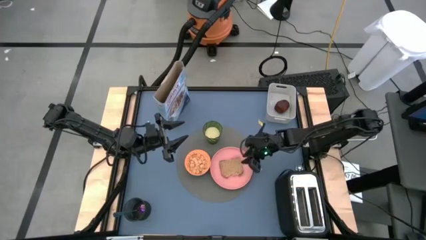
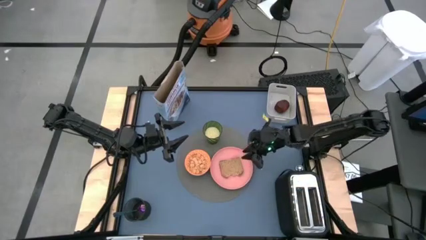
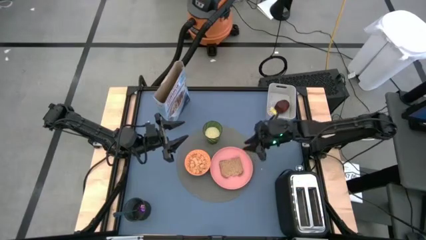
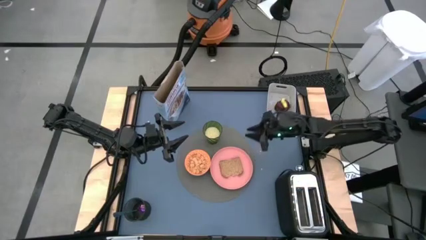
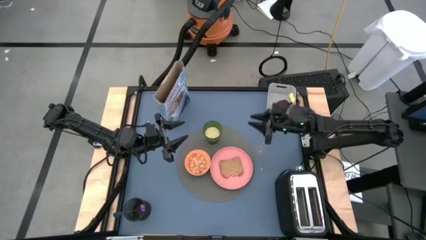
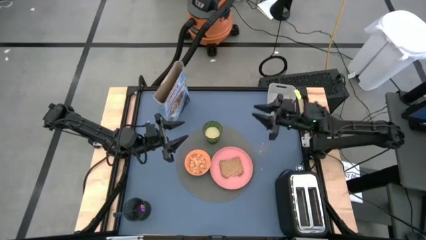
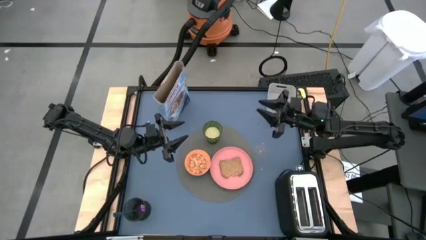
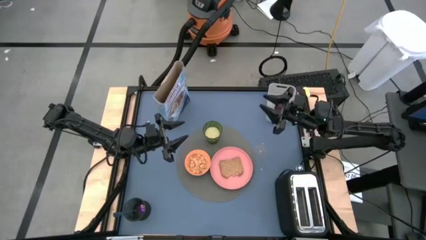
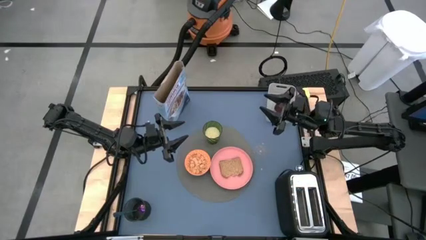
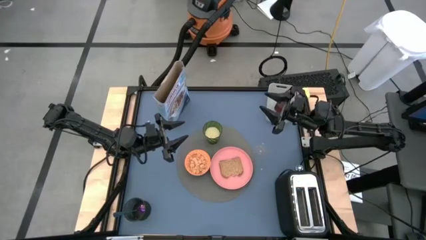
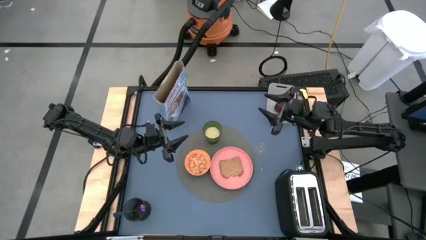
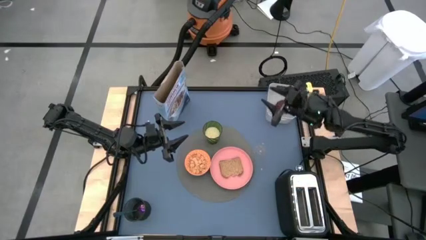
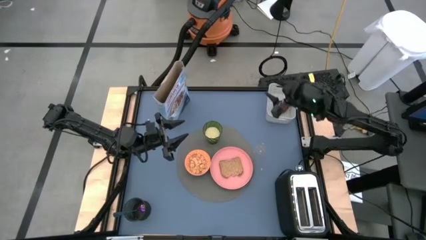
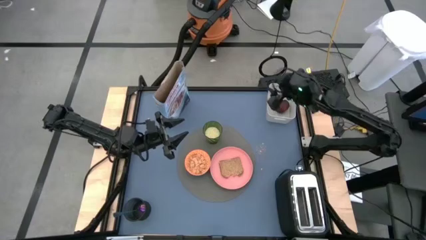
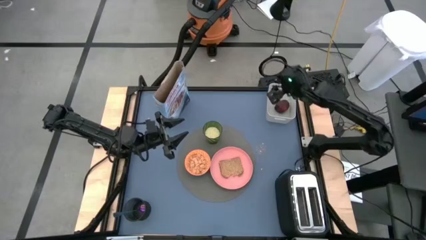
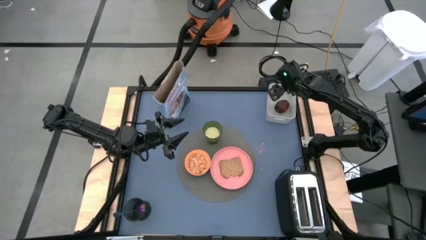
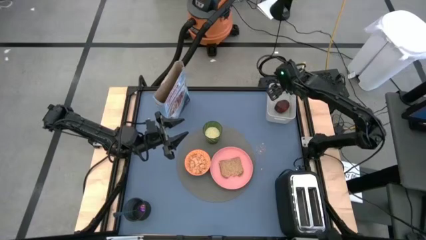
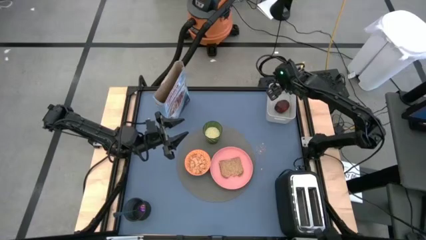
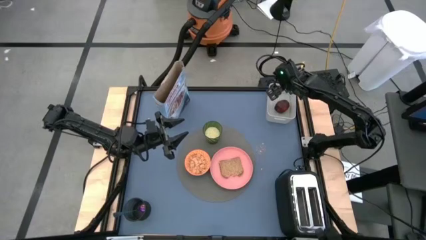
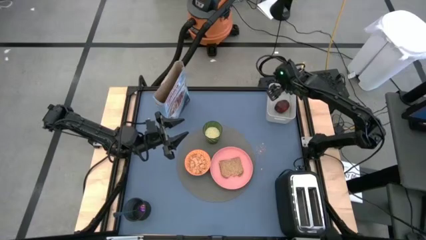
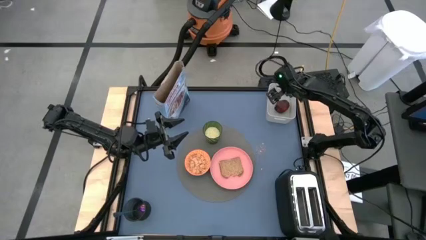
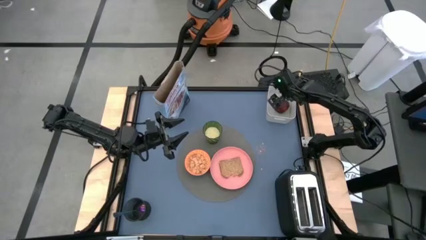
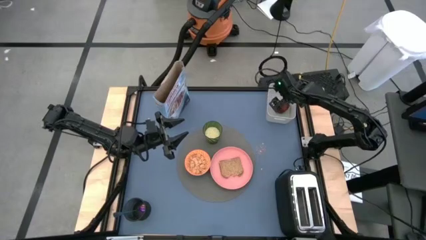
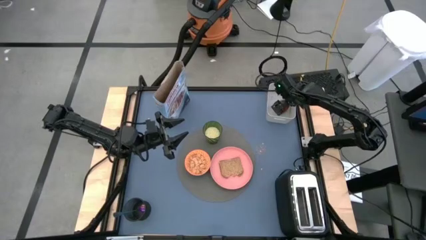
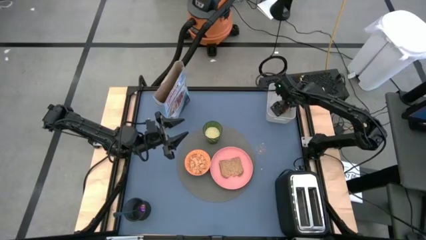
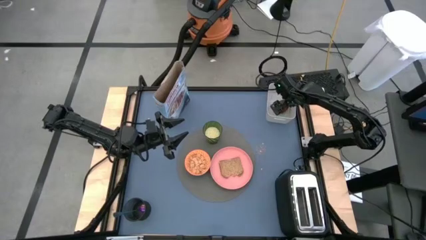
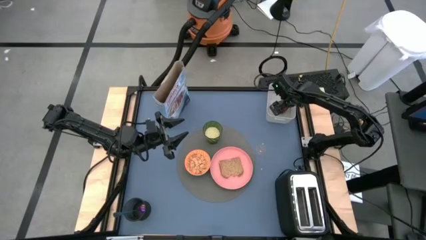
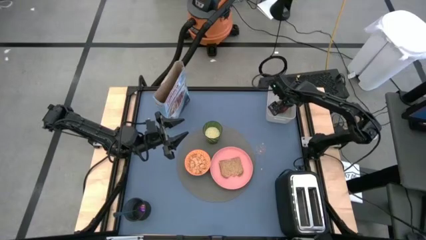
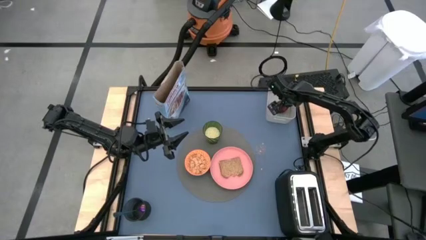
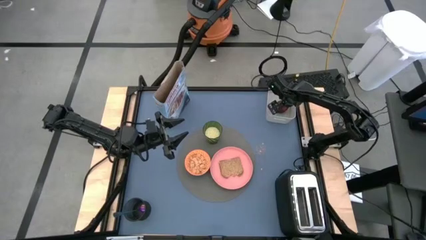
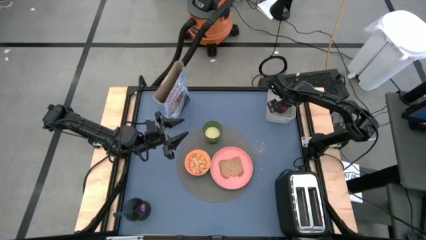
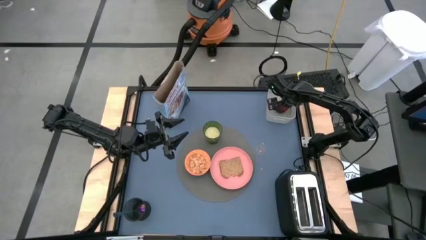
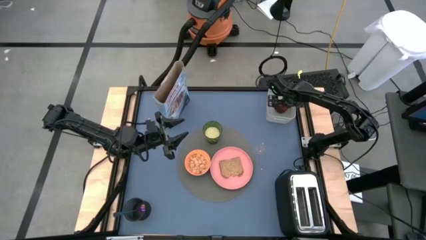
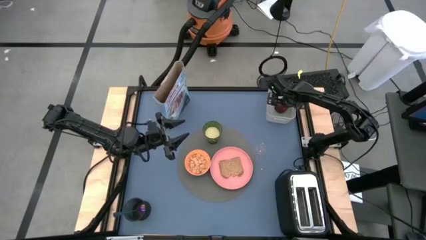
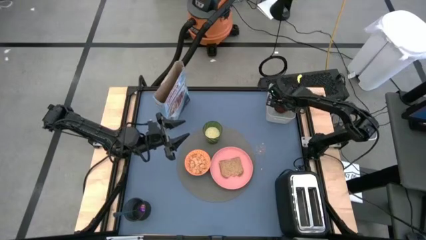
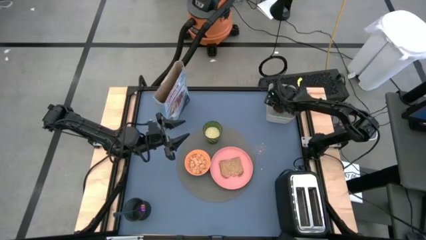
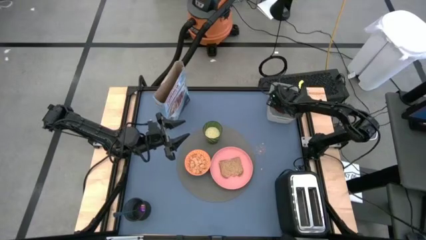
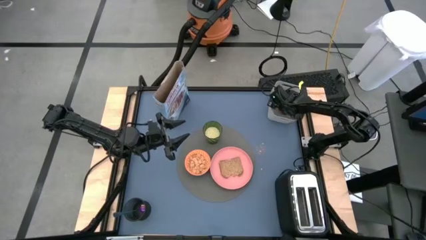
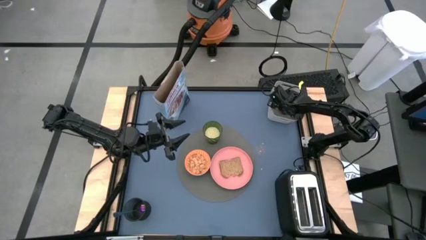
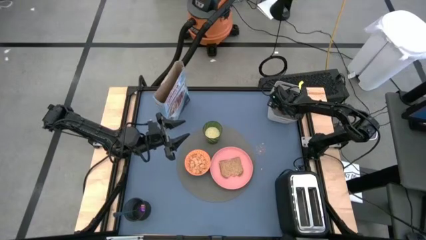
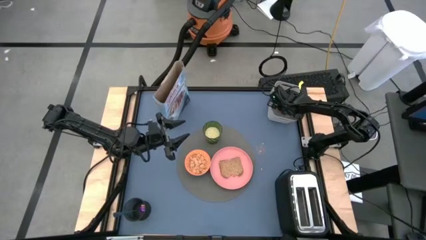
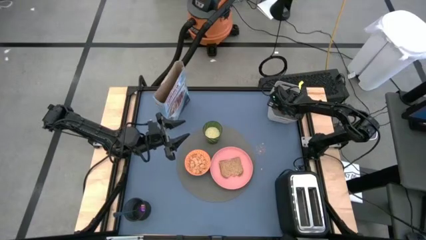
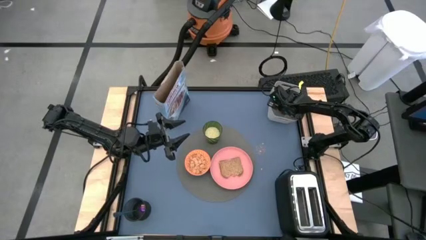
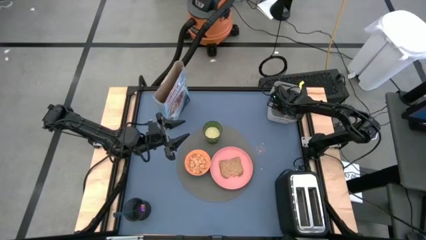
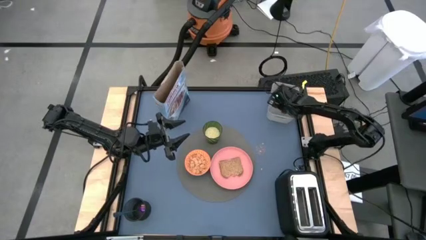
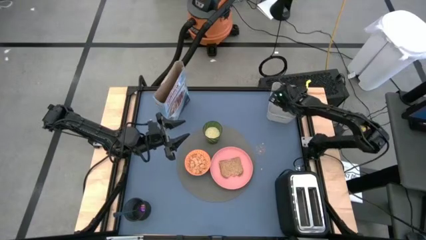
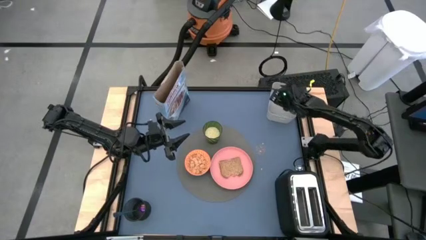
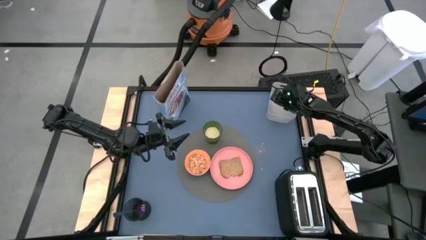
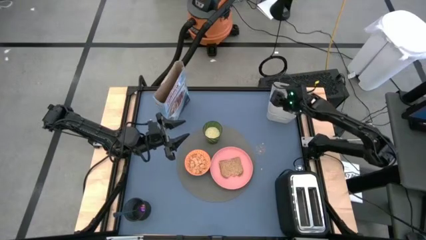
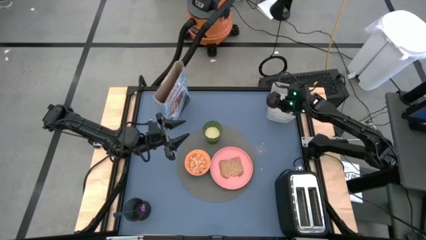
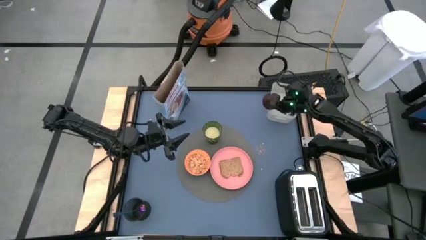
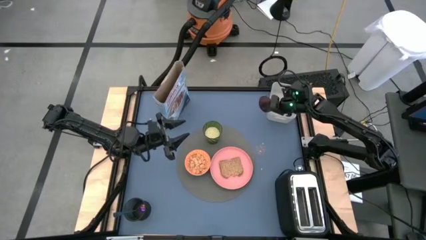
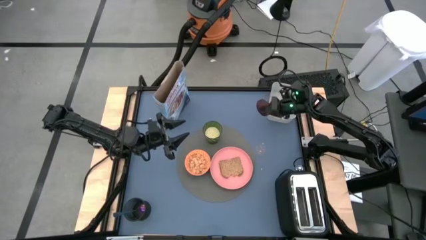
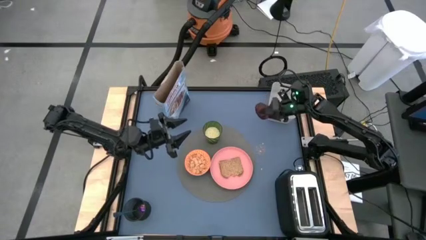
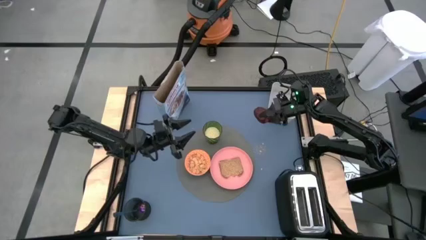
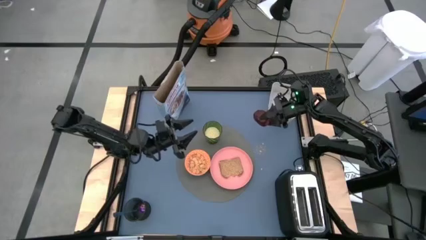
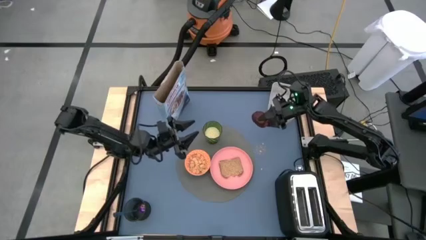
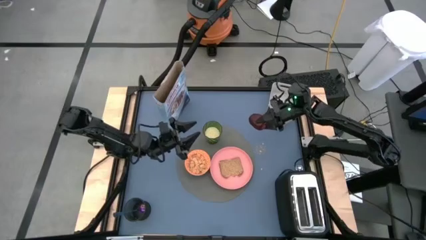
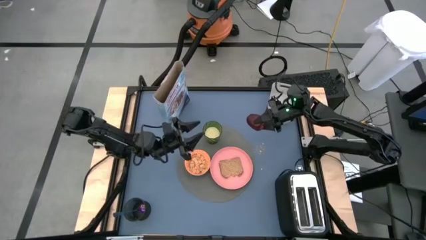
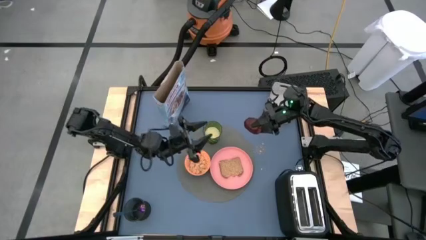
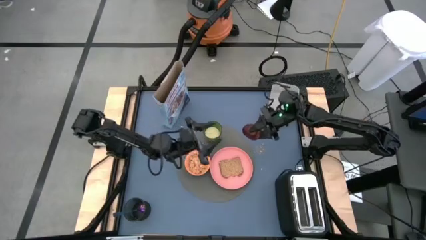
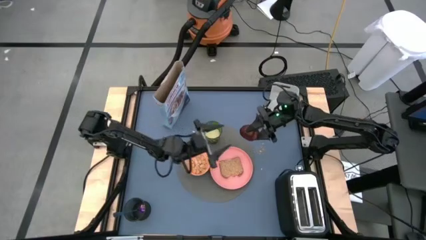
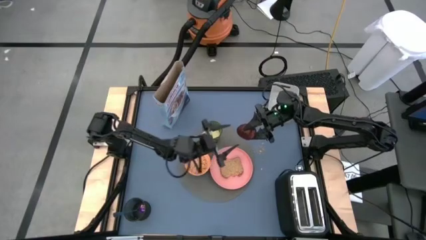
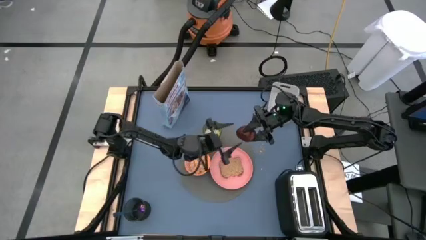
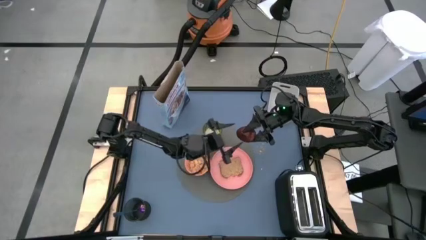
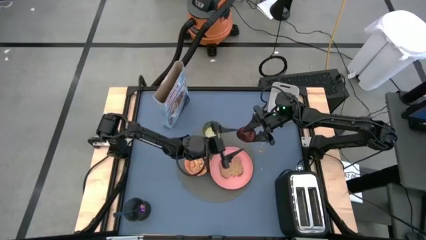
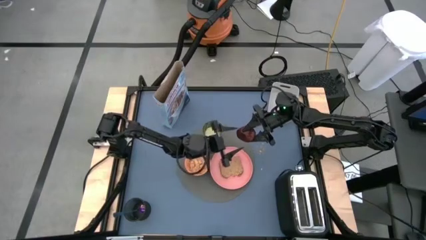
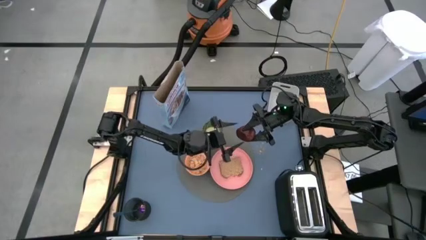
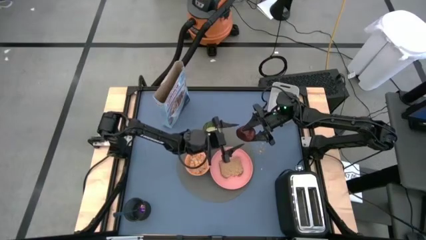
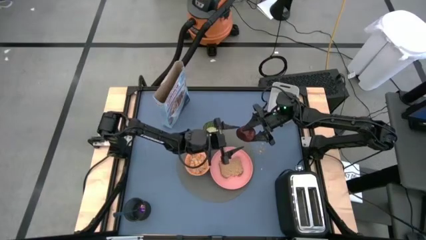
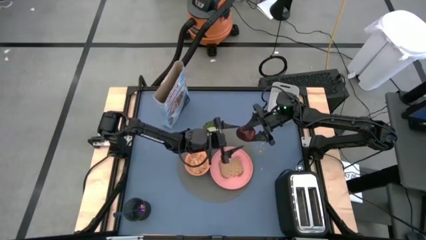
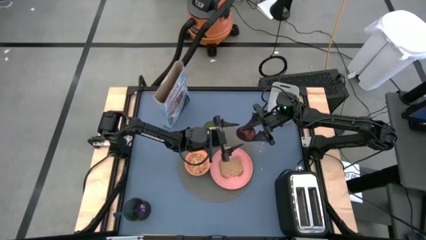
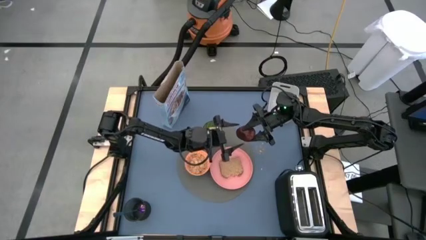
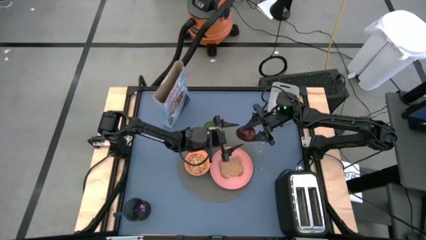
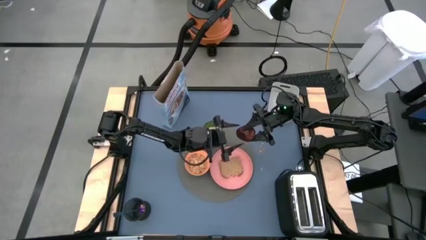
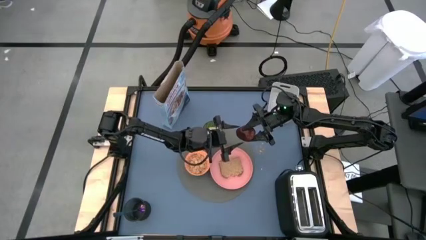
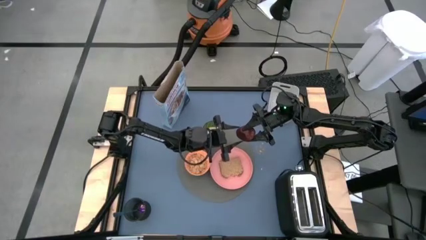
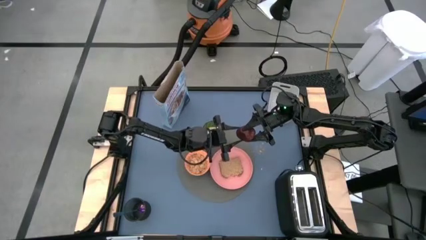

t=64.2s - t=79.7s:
Task: Arrange a breakfast setting
Put the apple on the gray table mat to the right side of the green cup
